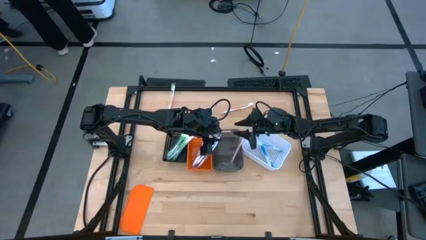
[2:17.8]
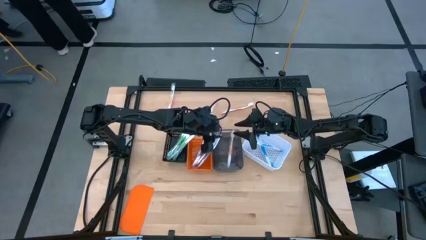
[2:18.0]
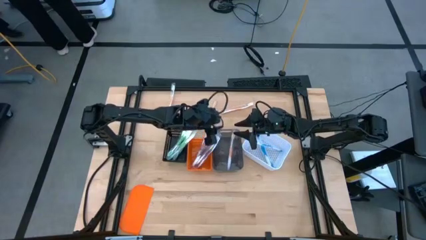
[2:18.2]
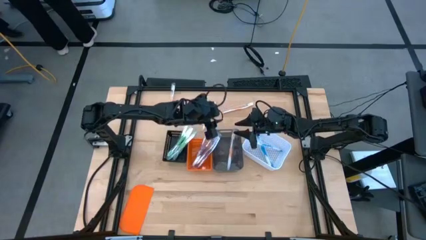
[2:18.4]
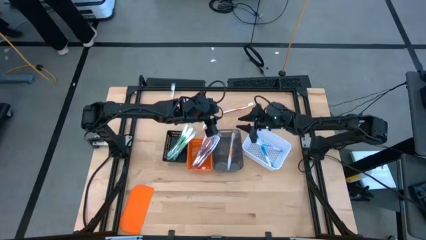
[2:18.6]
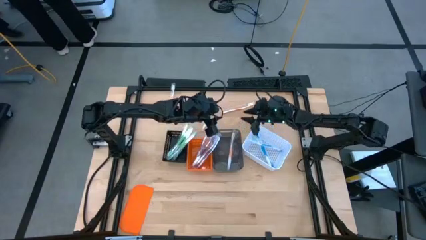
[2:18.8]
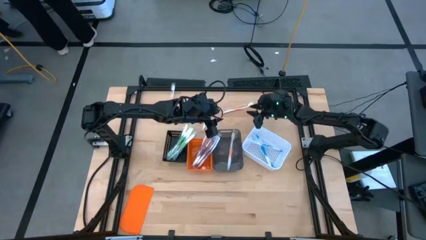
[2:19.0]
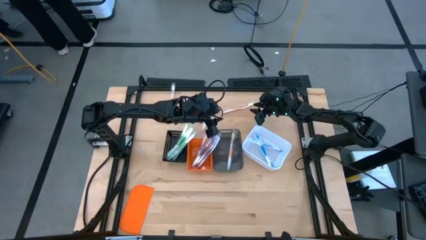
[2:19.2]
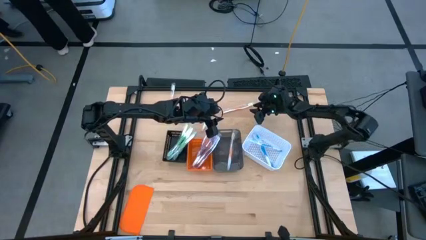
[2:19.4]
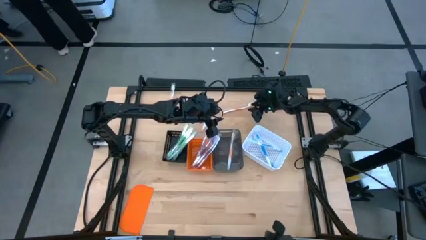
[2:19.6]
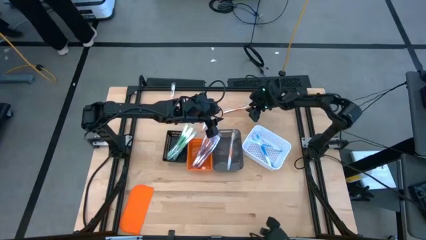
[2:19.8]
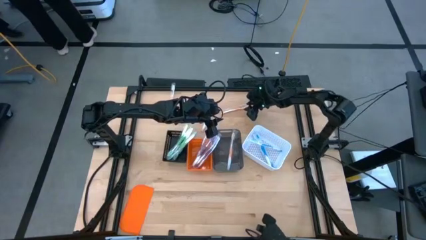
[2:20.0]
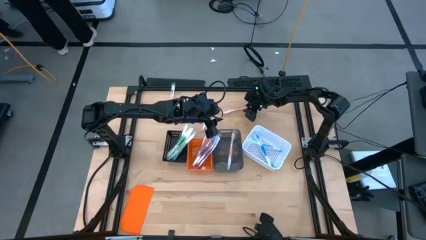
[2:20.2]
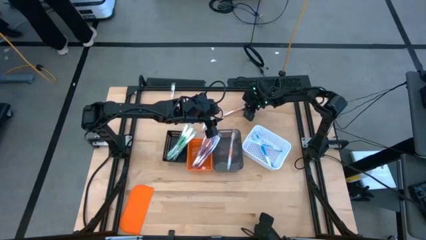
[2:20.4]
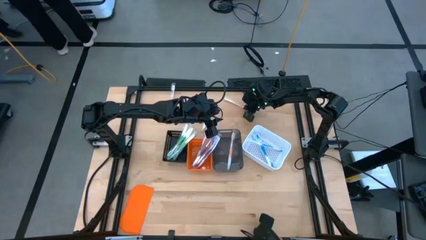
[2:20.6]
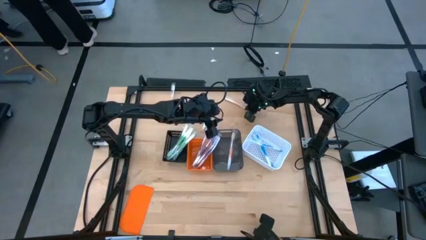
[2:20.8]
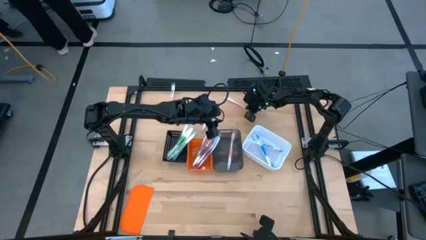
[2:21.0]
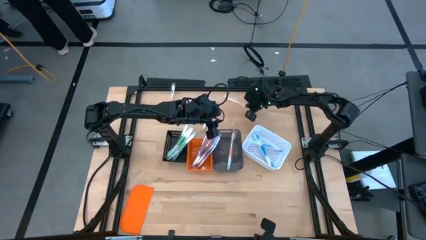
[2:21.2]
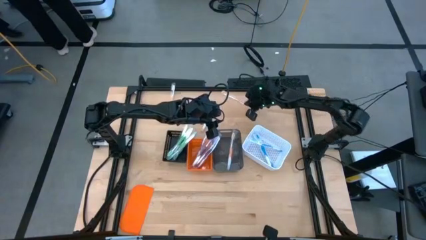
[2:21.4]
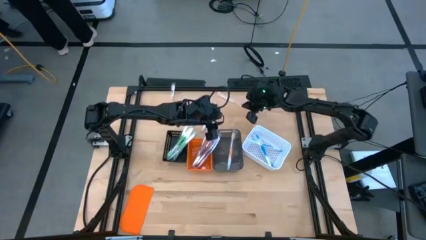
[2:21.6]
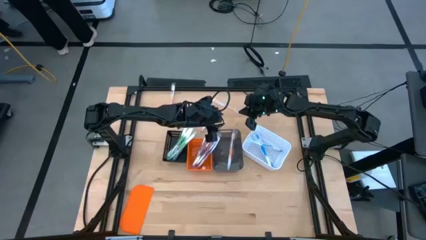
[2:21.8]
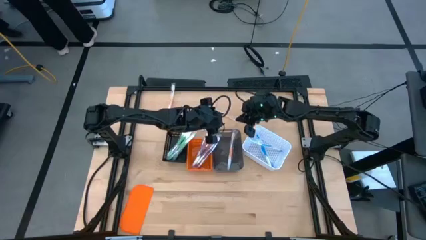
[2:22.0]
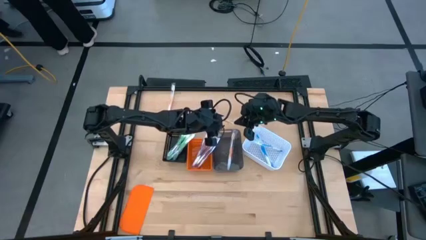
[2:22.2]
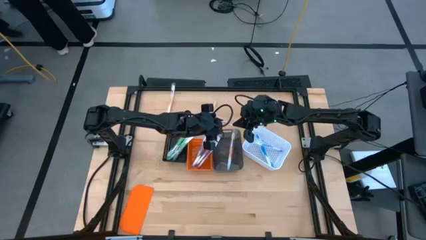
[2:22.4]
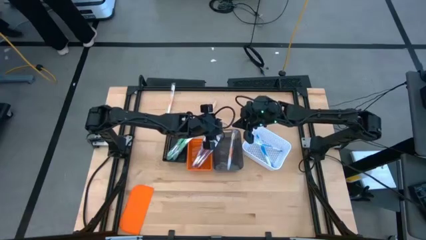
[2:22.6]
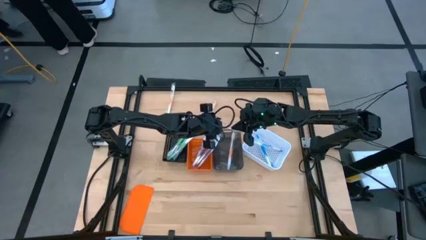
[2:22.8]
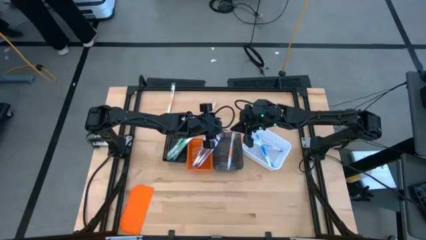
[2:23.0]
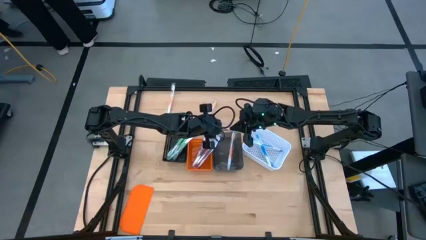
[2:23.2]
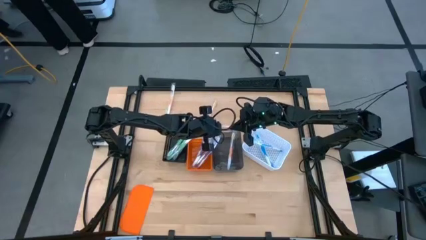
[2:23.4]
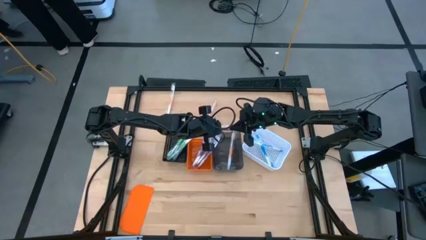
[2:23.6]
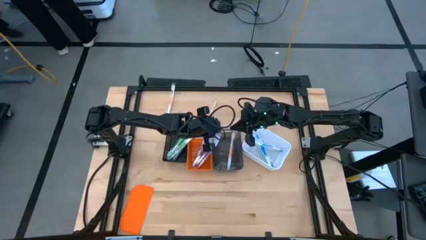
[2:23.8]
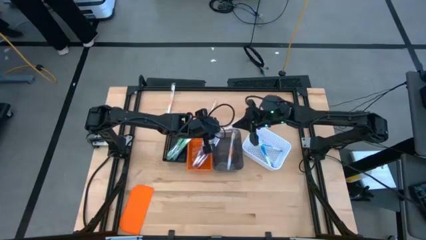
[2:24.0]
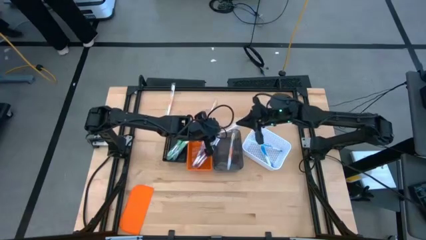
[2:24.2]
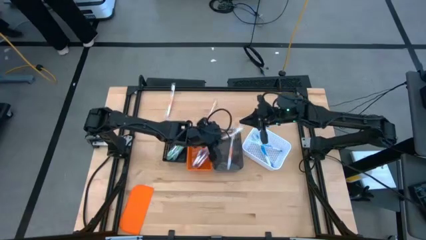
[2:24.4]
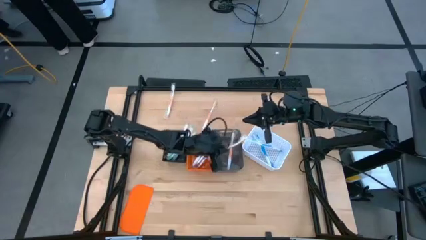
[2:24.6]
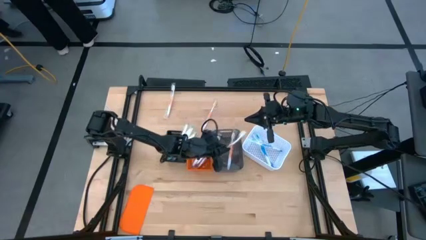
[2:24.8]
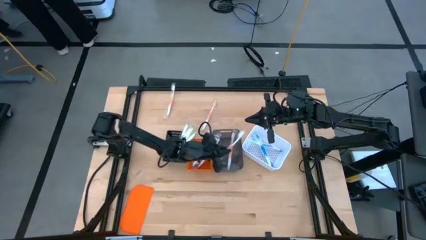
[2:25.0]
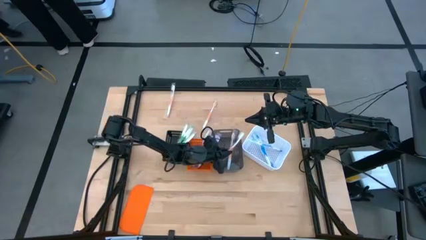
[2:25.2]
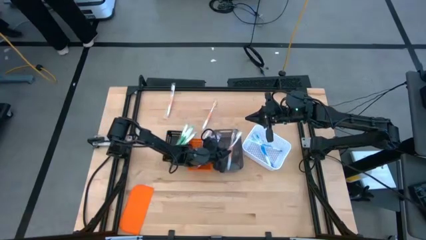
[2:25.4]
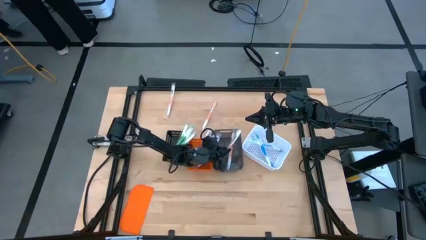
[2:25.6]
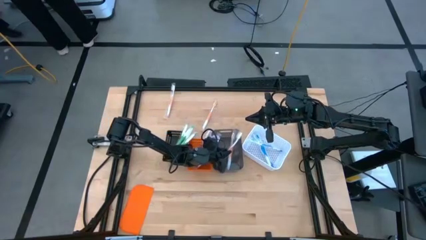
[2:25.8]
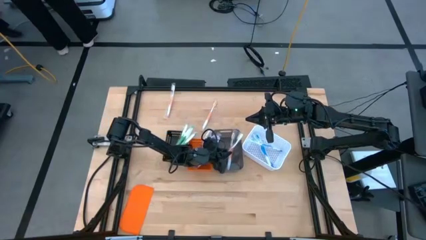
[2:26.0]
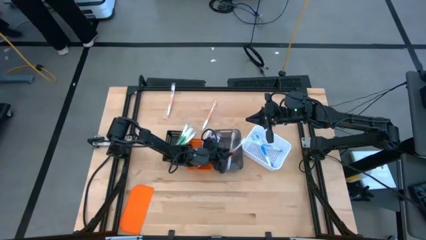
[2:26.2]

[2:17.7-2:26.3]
Task: Pick & Place Toothbrushes
Put the orange toothbrush into the black transparent bin

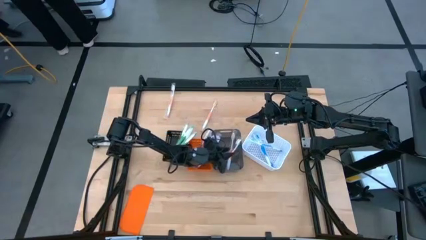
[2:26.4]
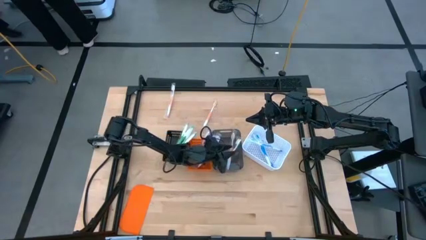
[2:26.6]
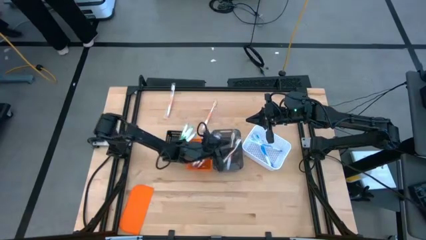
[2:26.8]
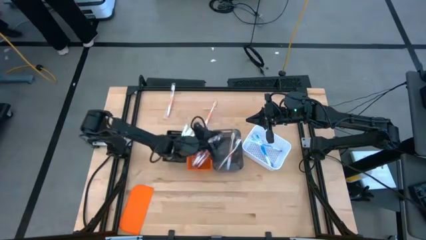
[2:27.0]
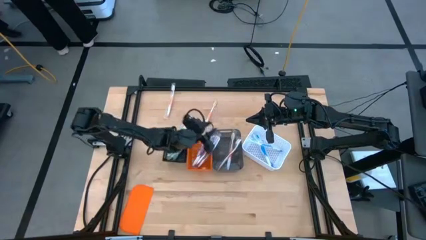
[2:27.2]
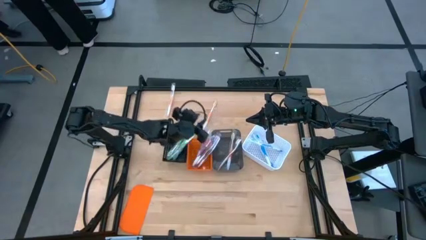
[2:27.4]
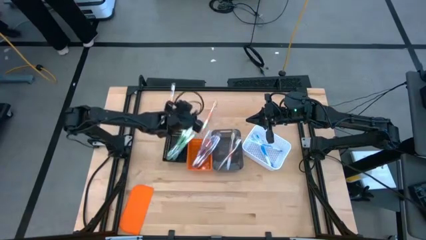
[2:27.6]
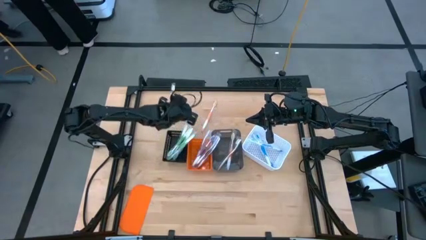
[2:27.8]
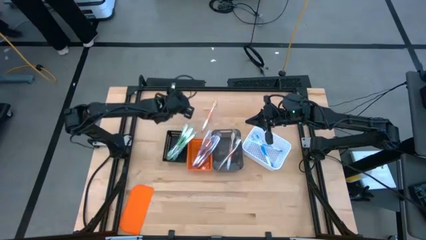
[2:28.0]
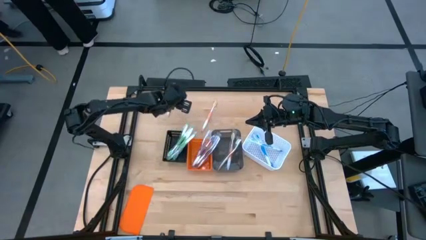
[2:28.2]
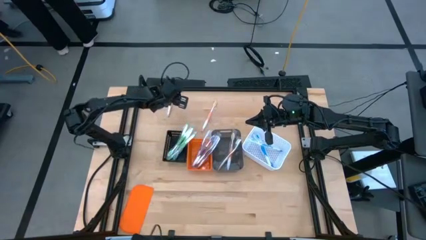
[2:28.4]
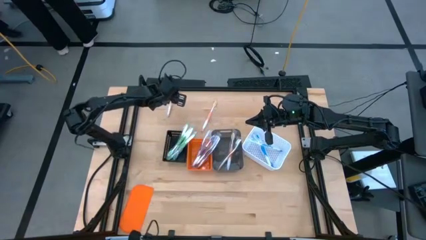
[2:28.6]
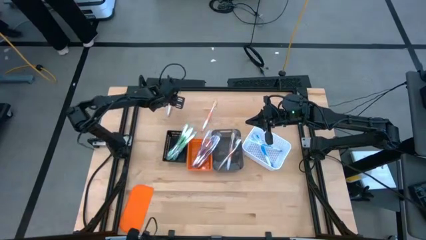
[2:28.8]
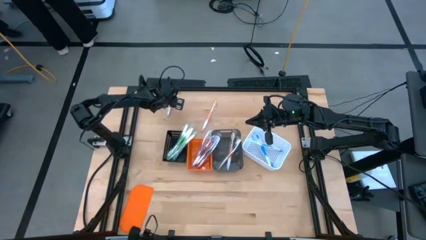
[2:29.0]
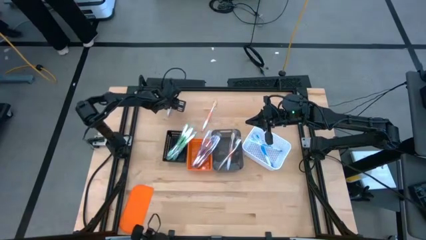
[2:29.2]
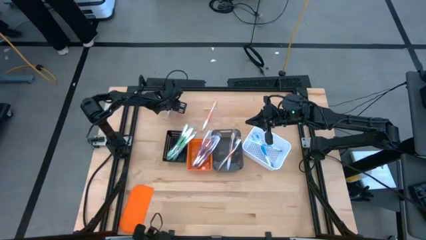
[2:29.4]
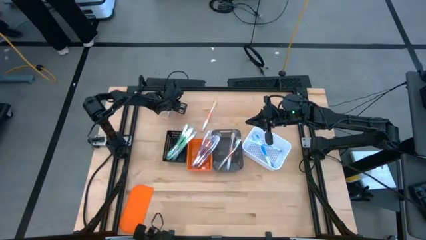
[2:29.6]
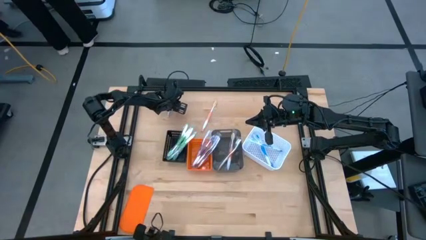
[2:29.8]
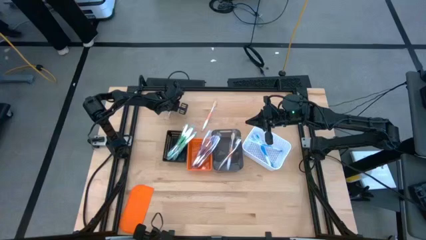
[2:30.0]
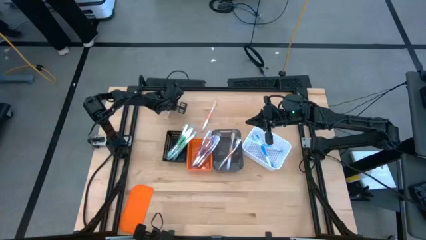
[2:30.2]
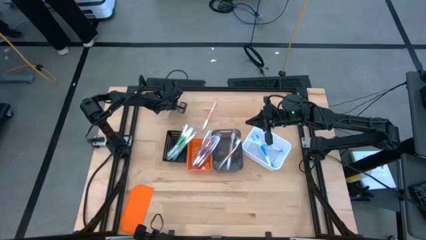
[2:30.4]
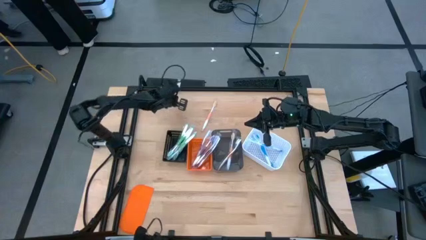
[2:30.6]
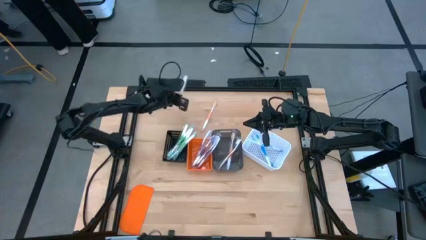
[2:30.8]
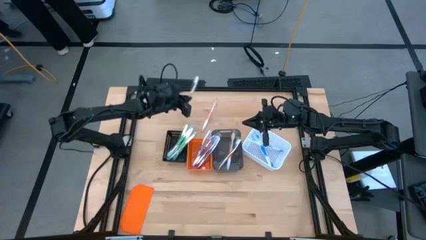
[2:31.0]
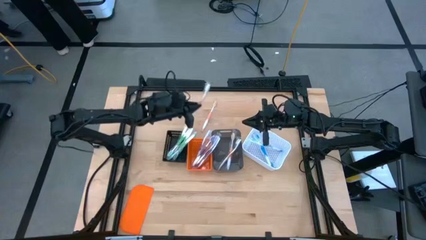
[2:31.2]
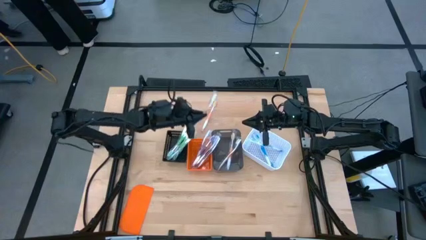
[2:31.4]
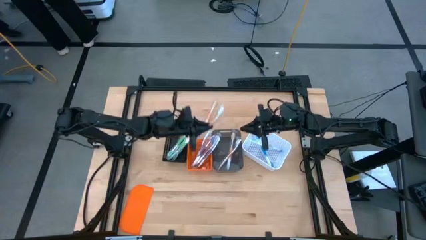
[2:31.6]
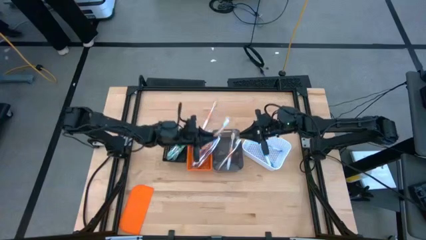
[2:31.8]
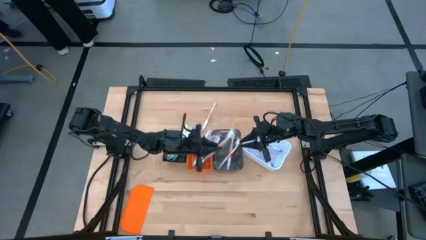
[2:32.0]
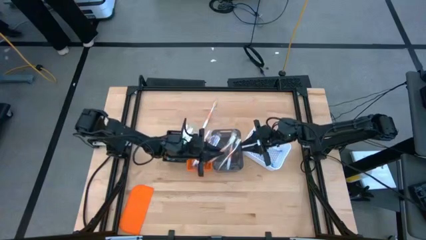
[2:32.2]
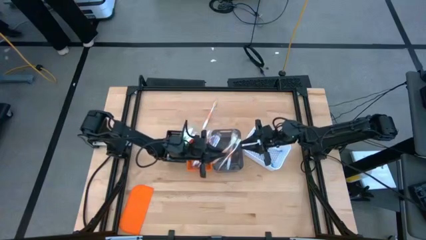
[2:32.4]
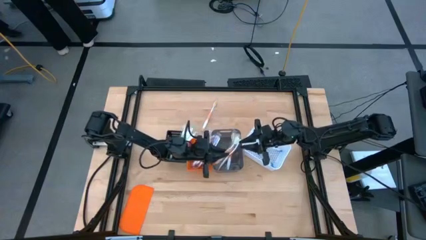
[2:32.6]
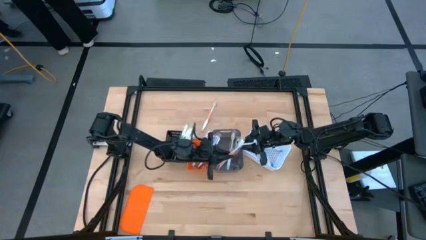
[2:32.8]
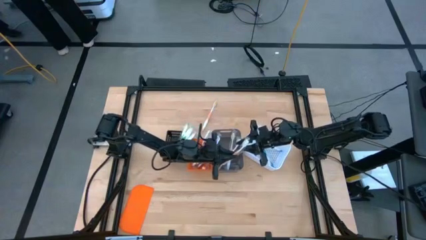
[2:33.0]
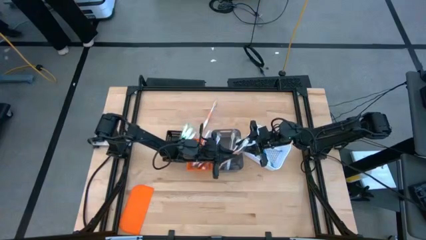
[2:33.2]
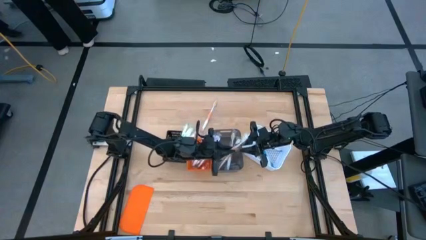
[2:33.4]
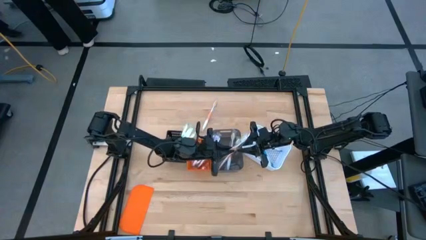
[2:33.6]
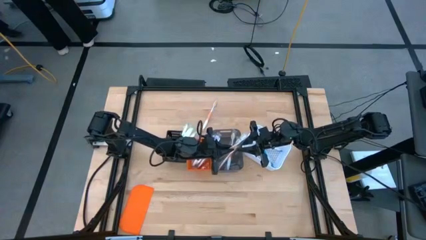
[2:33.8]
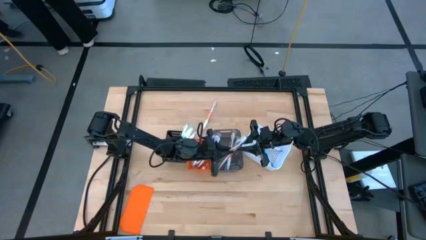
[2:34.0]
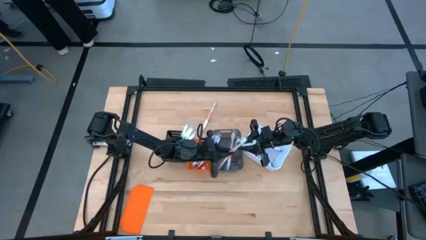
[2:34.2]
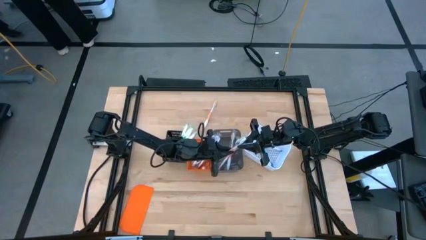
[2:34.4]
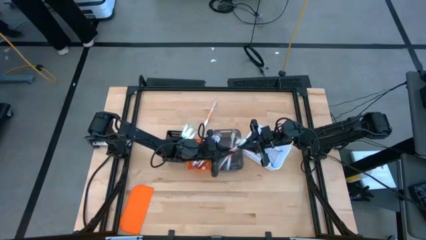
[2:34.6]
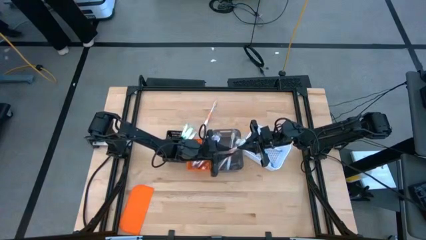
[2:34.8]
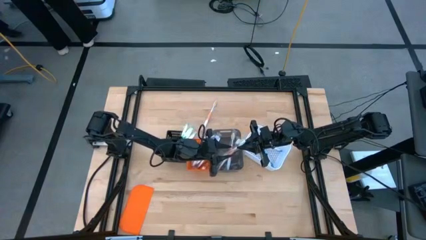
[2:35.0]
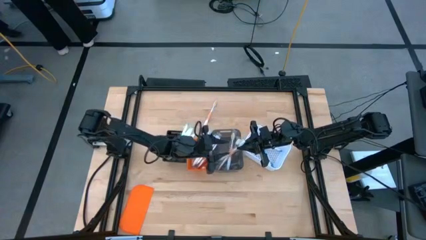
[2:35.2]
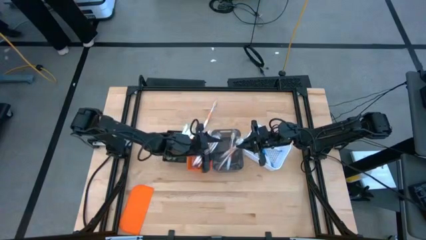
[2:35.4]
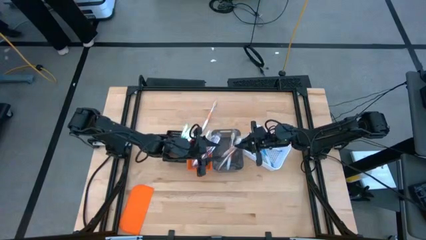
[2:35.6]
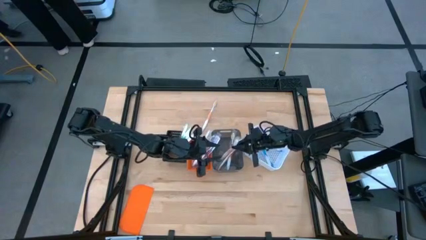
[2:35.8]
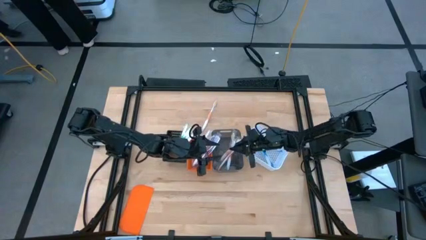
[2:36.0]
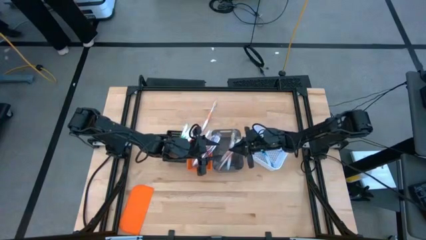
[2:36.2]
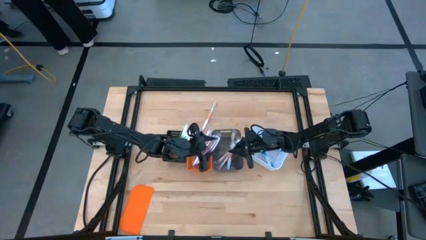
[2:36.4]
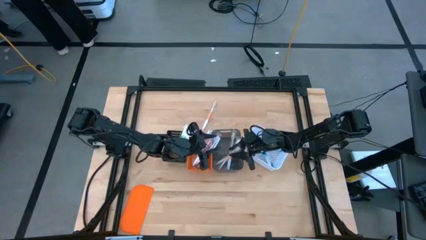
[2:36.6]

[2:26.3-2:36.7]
Put the orange toothbrush into the black transparent bin
